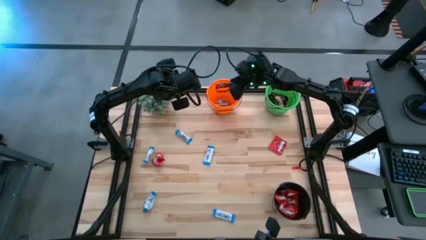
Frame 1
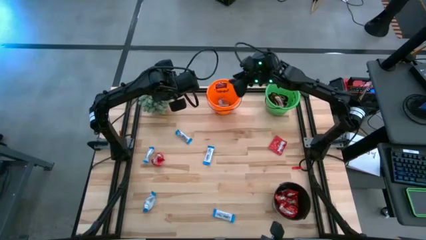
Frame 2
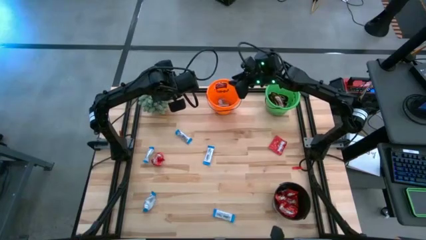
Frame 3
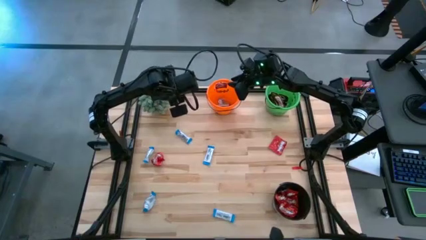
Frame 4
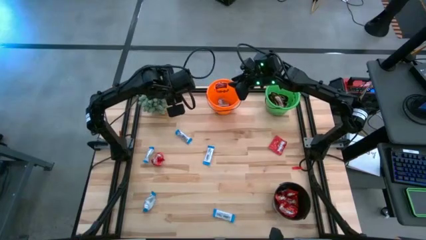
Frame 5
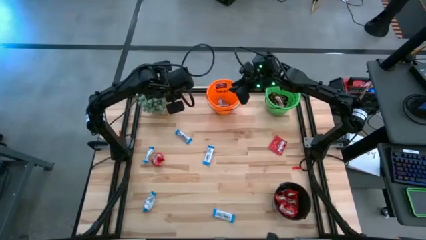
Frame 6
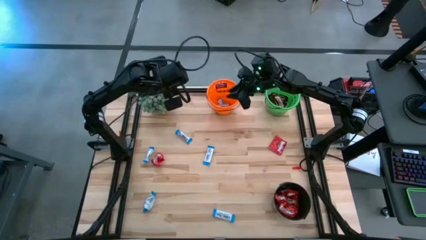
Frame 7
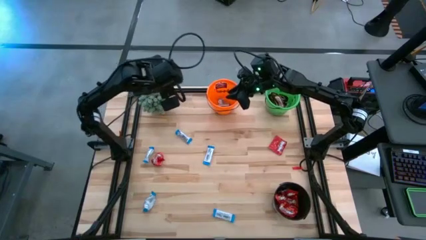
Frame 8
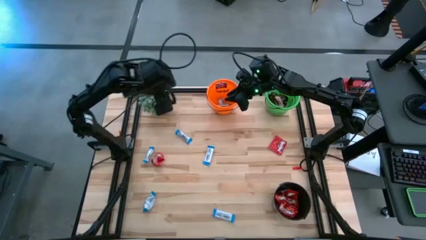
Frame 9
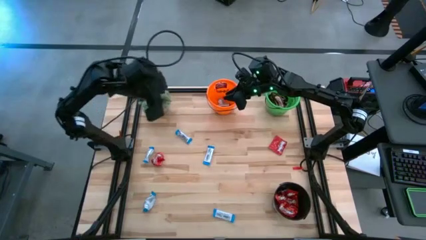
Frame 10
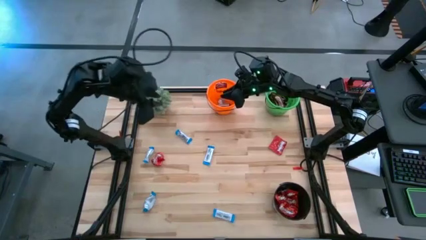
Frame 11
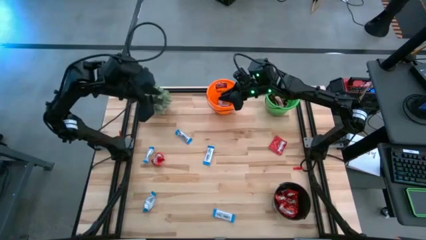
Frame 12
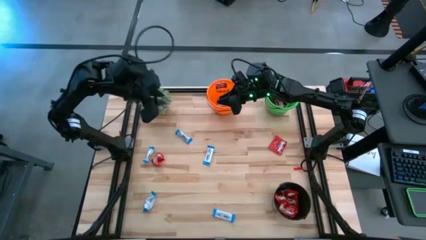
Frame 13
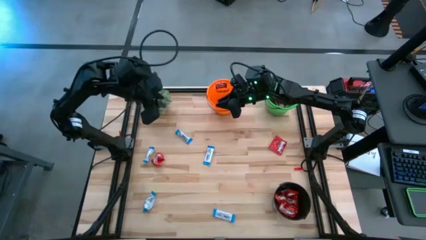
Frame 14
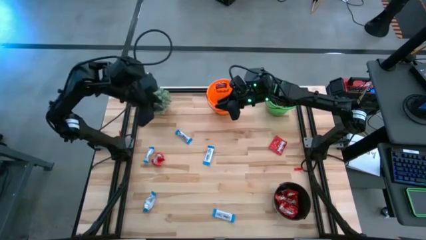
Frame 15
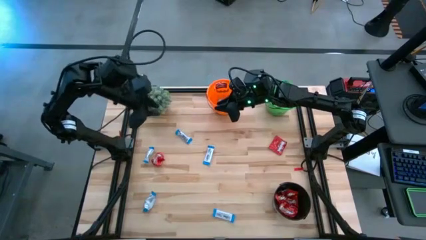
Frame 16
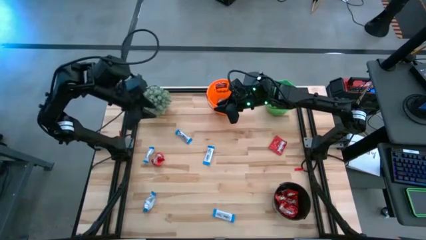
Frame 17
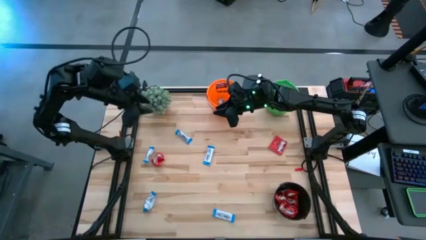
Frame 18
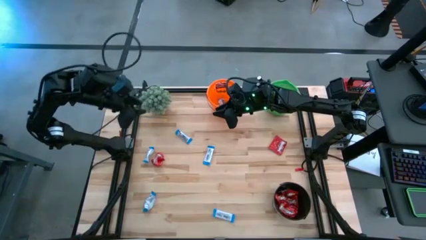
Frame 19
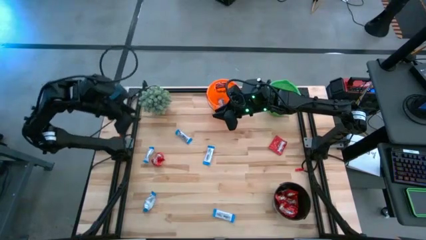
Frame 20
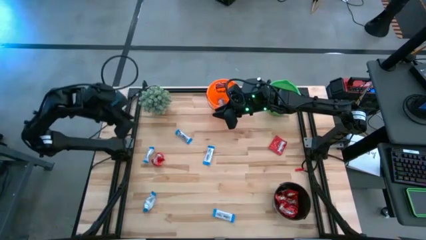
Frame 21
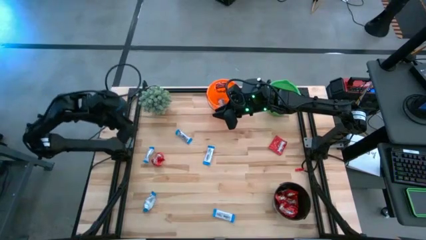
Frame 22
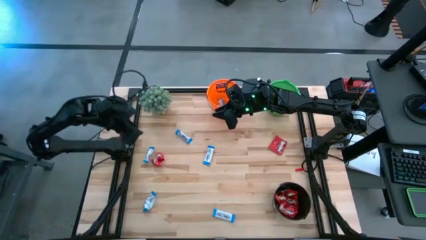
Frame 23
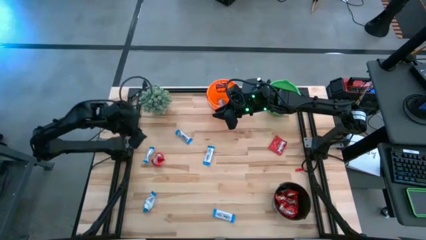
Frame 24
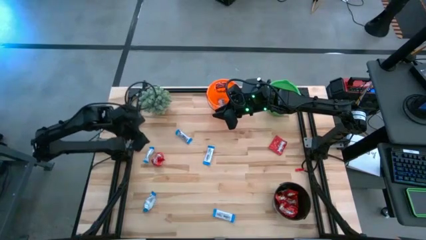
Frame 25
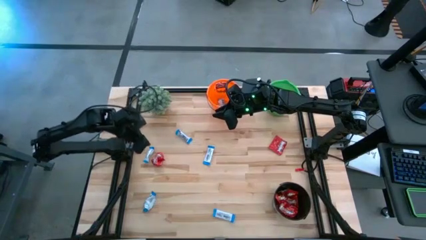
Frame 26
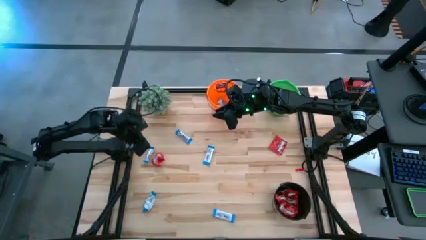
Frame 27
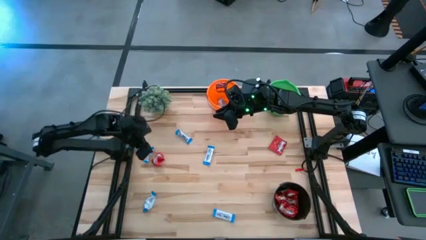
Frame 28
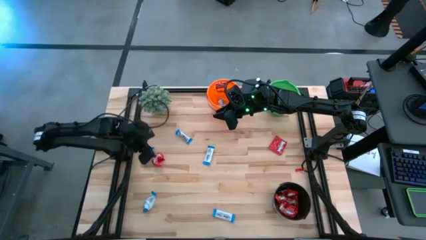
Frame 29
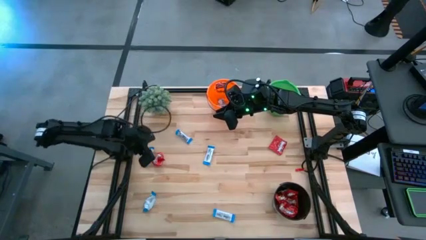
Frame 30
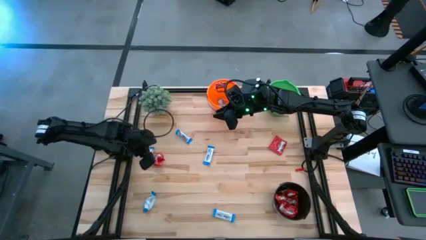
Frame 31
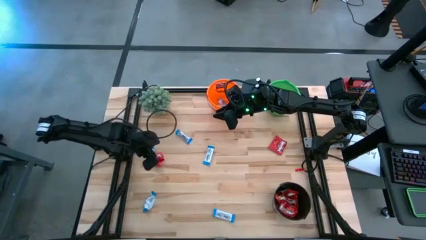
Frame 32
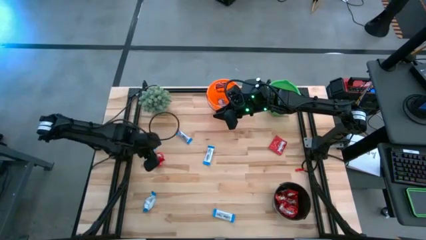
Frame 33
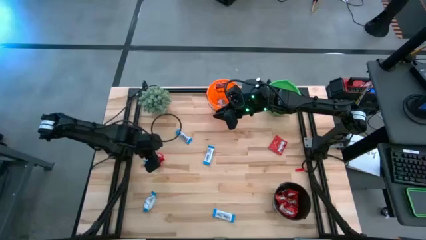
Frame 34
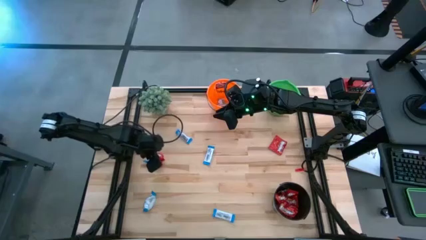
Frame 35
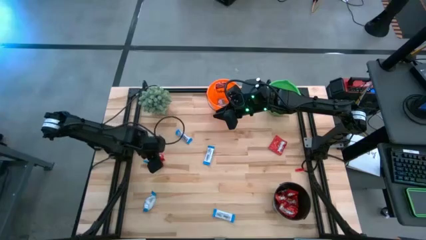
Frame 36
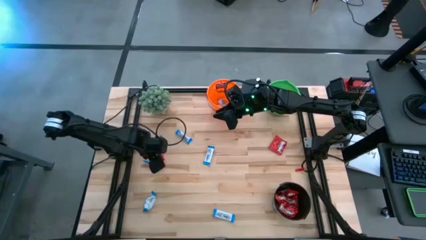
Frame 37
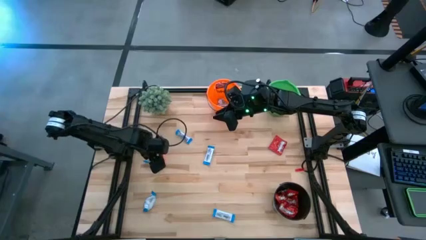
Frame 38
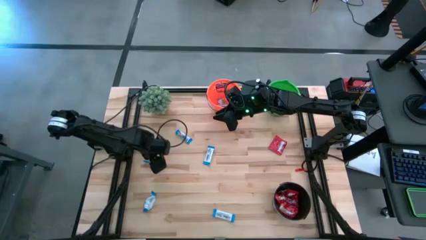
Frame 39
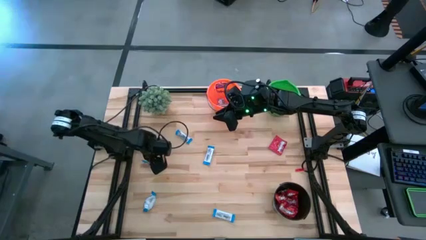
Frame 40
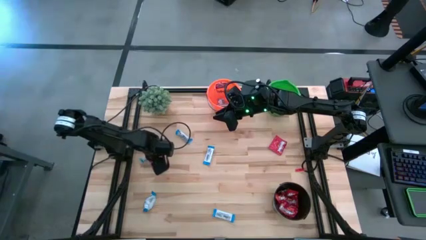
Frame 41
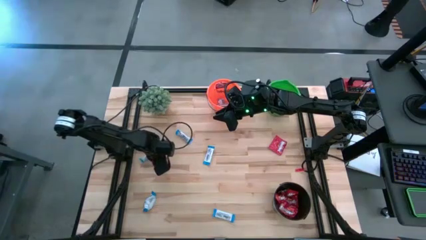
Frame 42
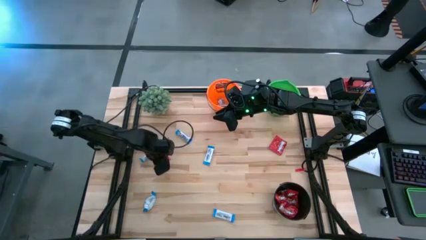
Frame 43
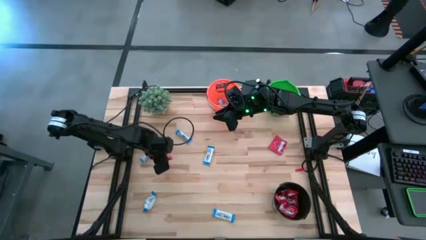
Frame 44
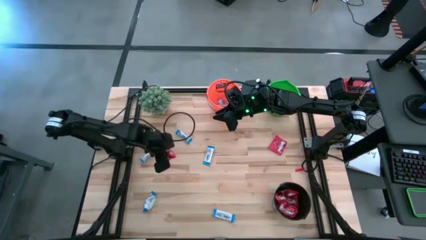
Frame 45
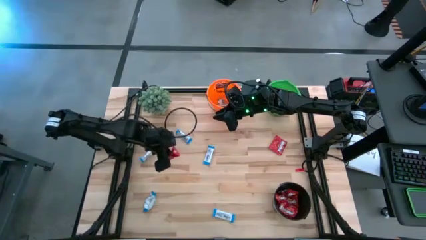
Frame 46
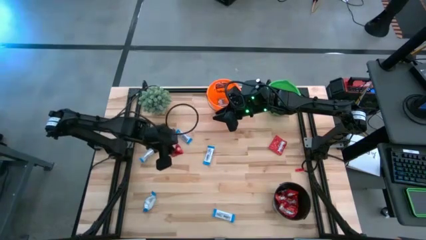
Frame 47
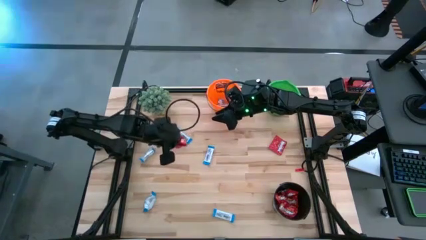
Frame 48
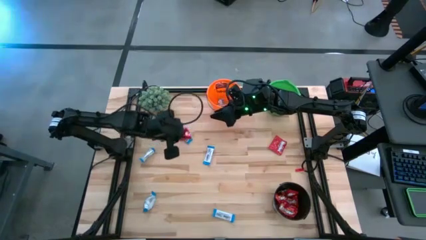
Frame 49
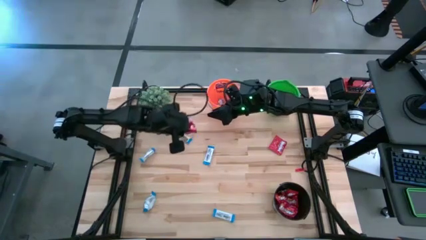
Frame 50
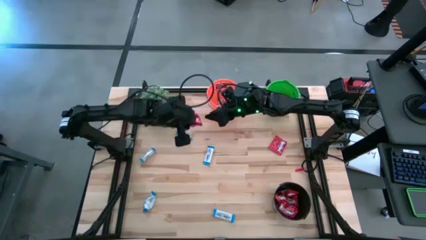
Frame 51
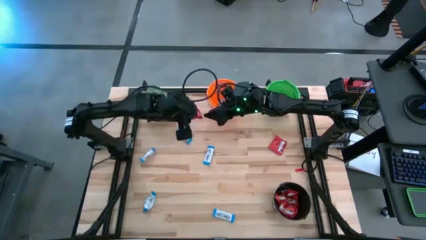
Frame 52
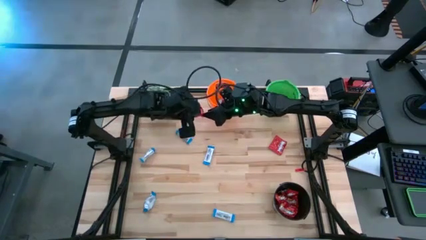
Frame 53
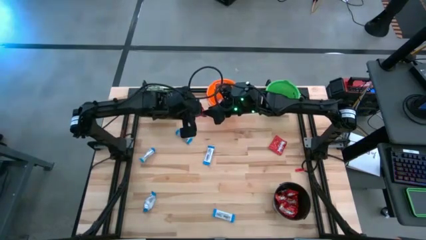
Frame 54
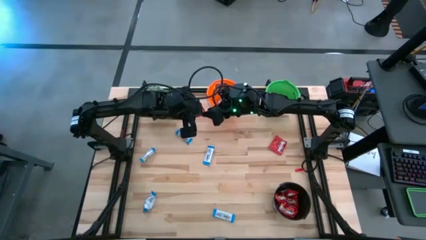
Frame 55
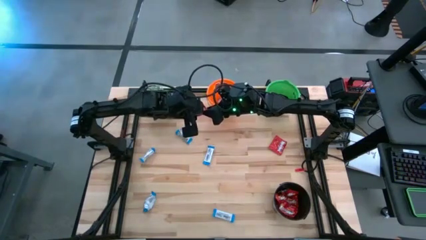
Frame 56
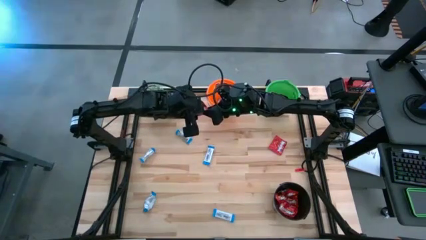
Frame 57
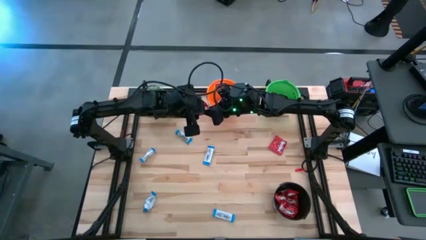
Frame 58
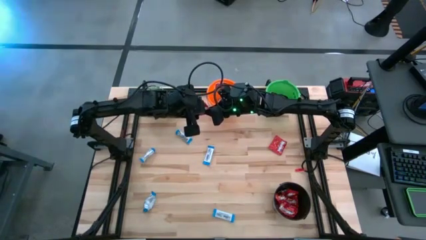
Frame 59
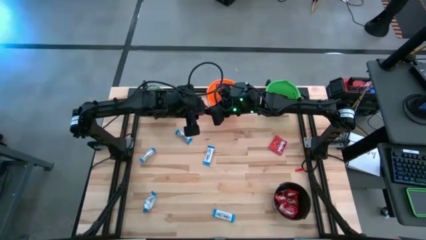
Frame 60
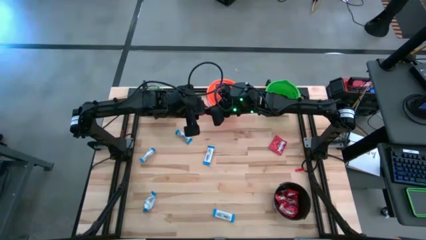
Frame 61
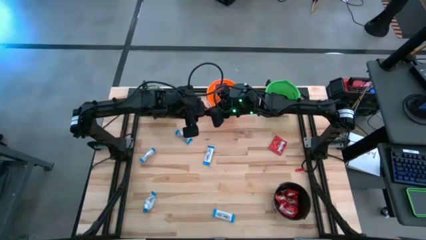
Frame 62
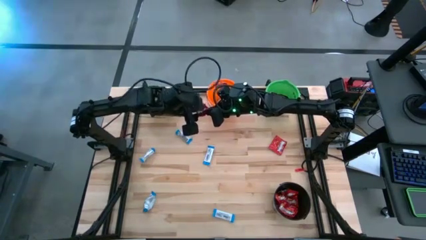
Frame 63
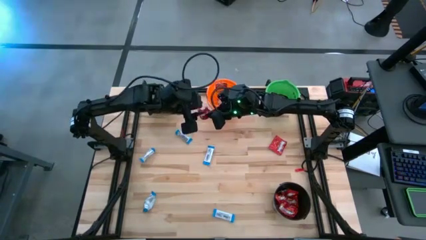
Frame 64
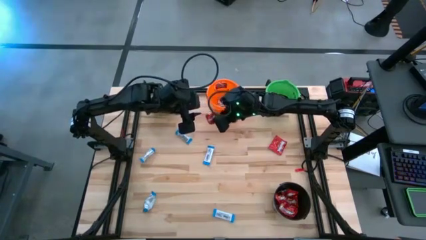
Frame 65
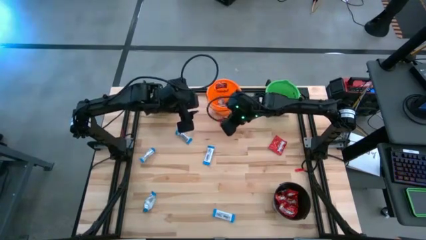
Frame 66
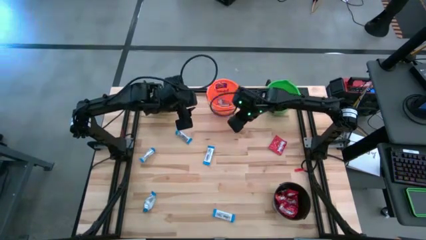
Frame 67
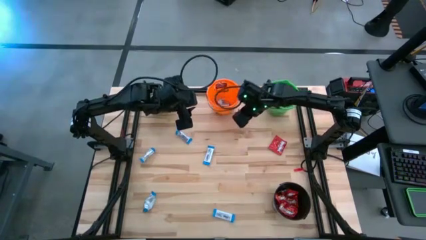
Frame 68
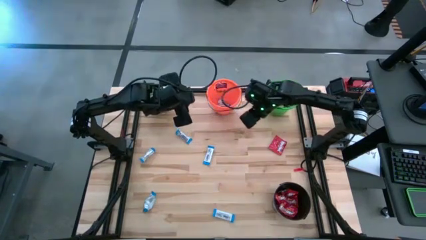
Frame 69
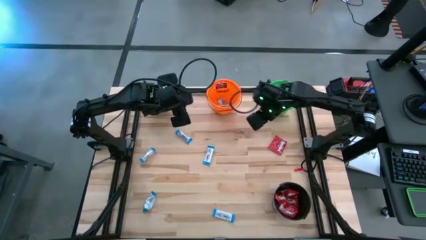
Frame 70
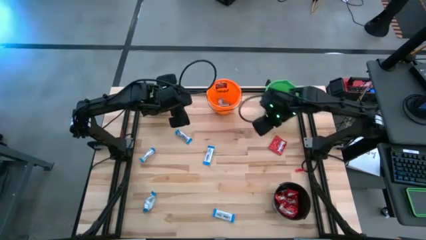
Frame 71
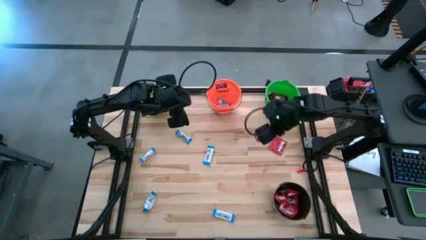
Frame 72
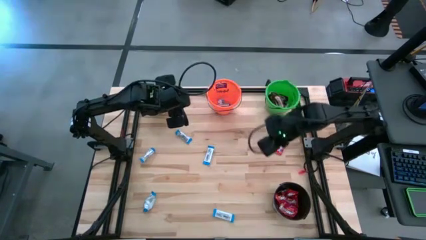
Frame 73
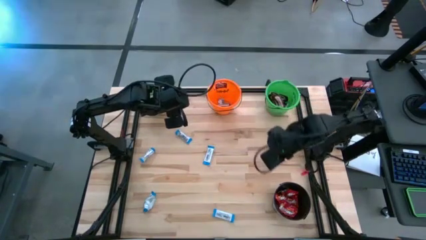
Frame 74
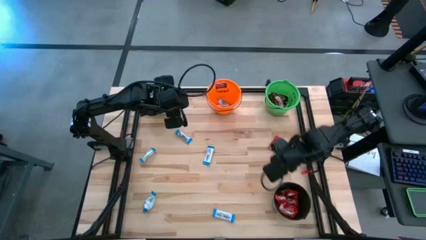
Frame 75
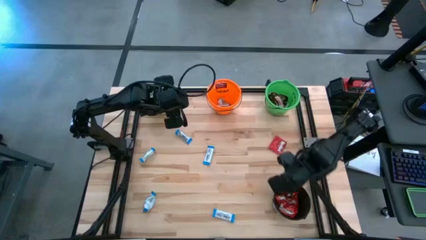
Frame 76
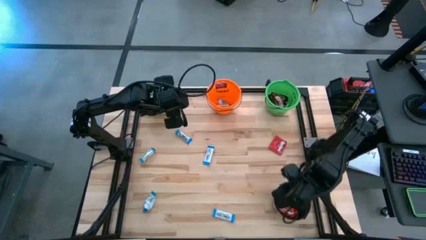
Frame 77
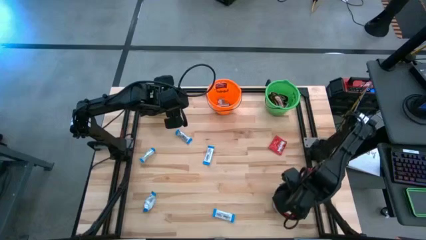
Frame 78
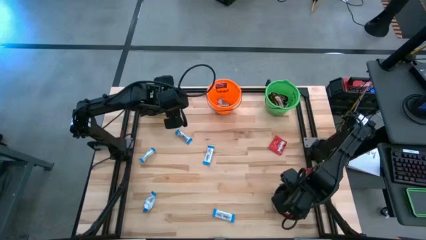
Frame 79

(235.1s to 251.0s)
Task: Organize candy in baskets
Put the red chocolate into the black bucket
